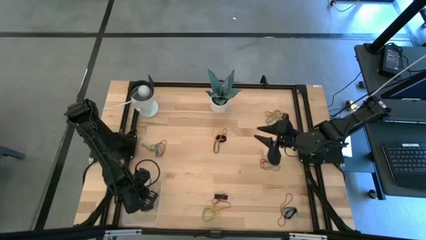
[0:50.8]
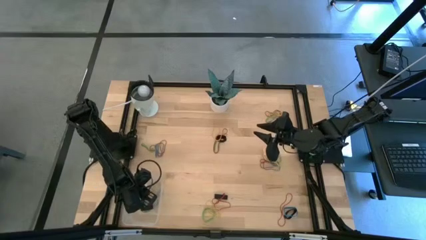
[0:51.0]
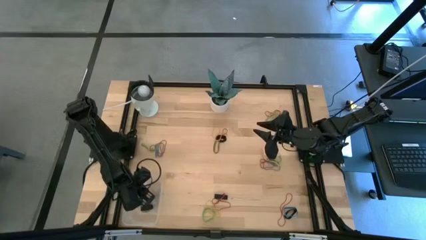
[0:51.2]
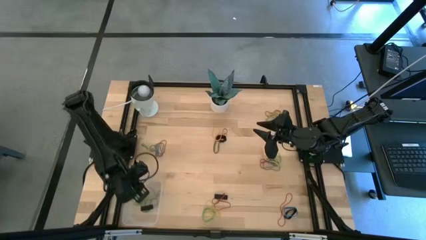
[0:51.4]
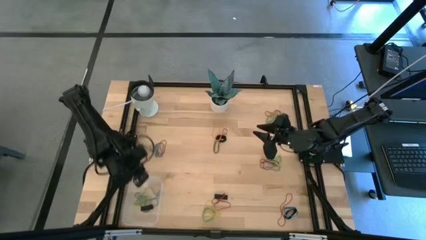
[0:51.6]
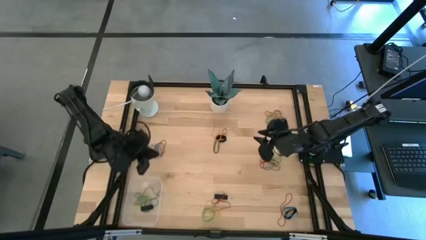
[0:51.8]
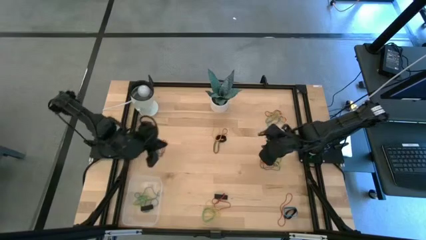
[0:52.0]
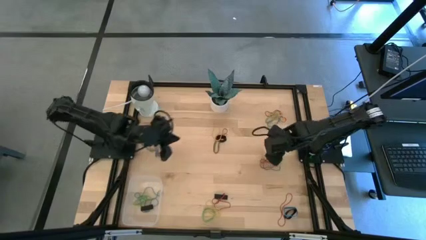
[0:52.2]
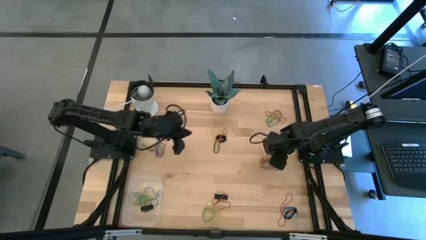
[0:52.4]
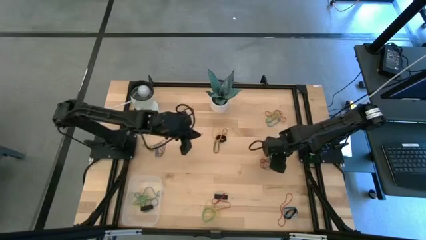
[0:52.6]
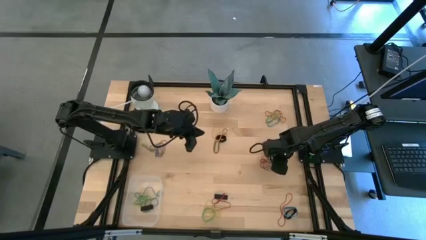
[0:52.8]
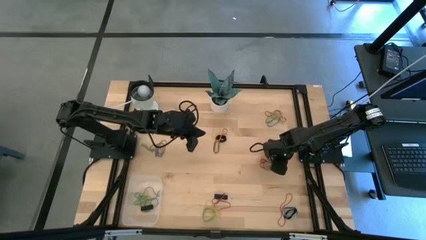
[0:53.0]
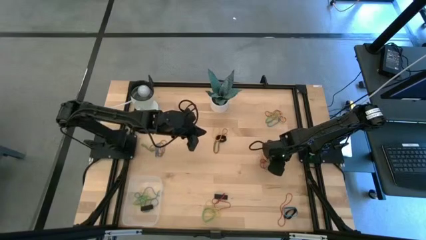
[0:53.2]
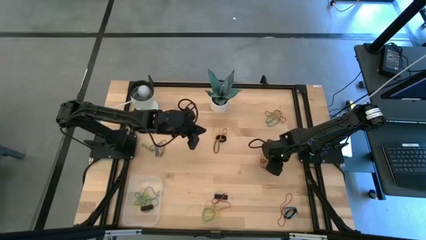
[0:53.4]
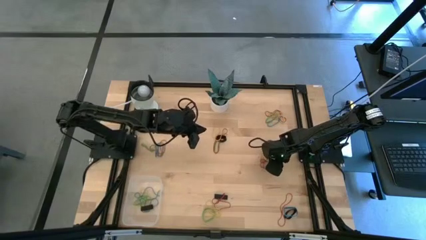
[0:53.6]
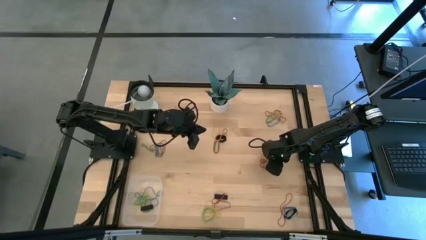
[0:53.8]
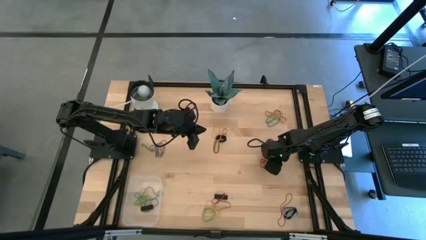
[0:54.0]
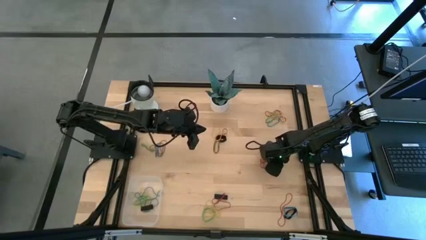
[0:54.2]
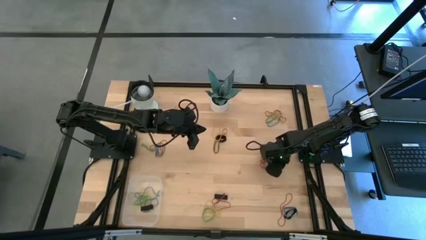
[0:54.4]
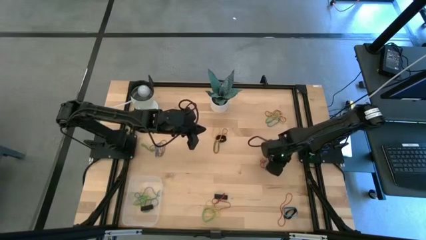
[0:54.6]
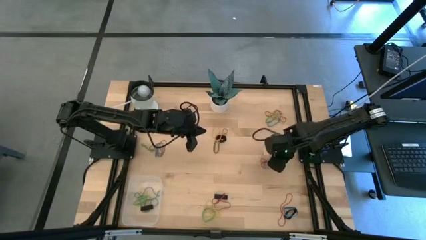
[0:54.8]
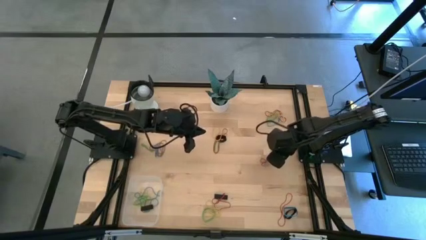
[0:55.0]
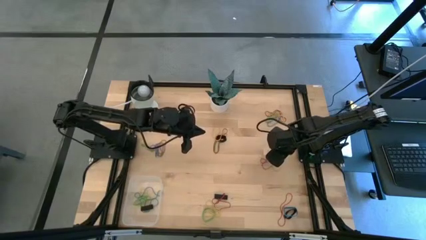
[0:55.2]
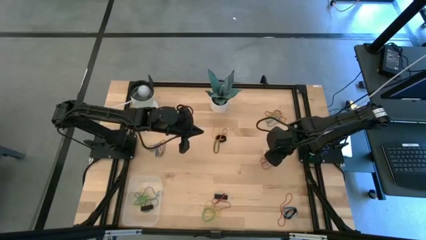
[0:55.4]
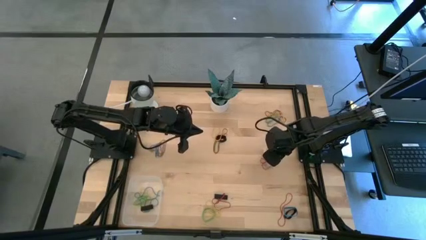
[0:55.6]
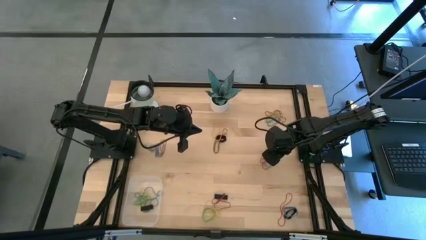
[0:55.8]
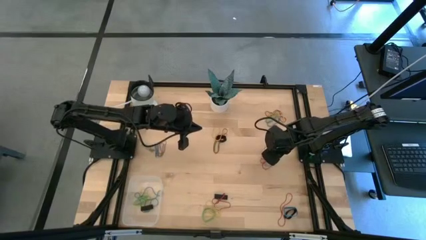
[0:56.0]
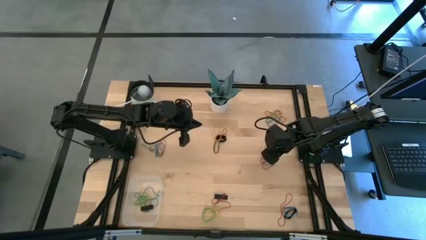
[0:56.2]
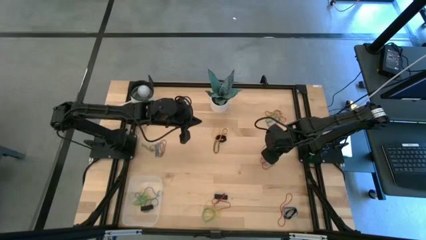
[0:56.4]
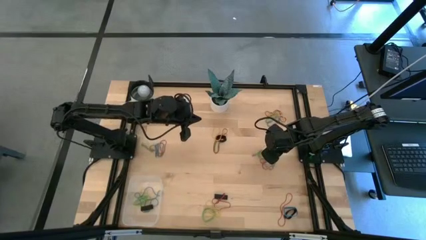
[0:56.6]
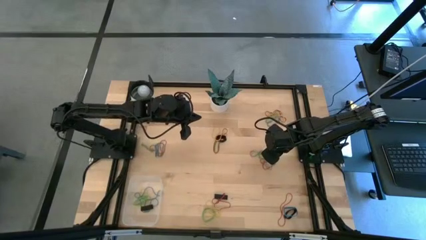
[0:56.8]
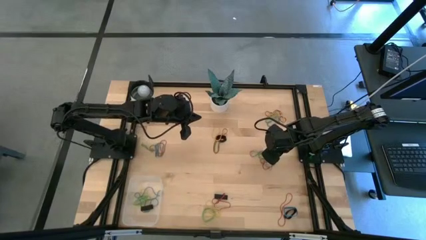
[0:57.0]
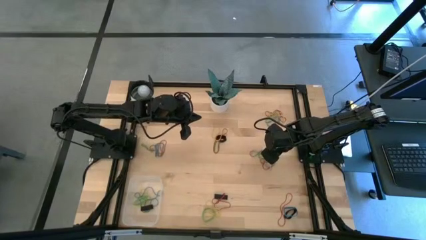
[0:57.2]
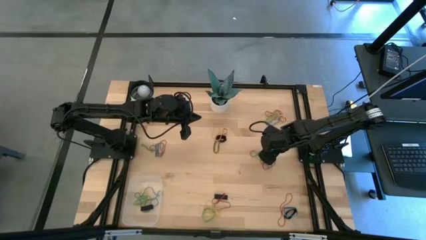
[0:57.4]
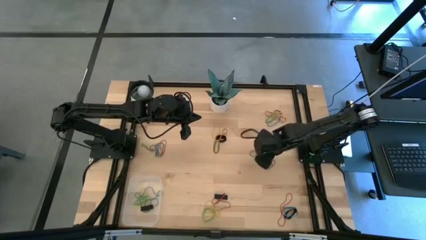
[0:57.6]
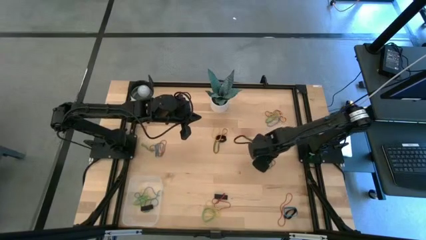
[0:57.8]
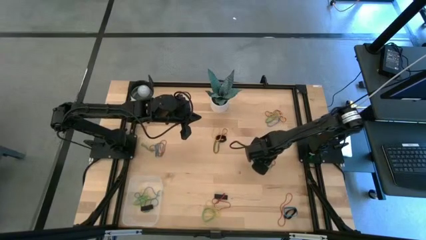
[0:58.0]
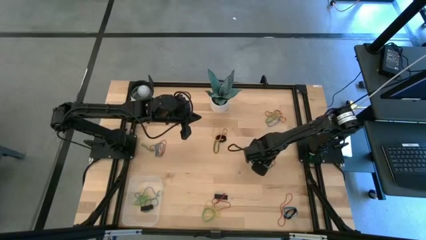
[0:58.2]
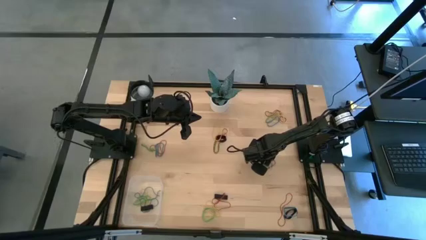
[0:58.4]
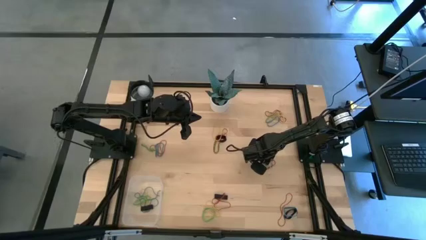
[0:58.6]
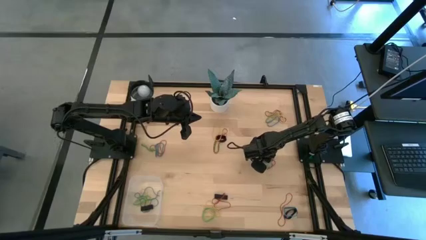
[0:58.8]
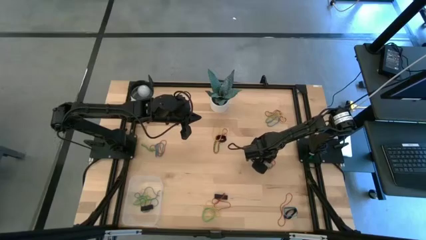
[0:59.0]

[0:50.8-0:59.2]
Task: Pick and place rubber bands into bin
Put the yellow rubber band into the transparent bin

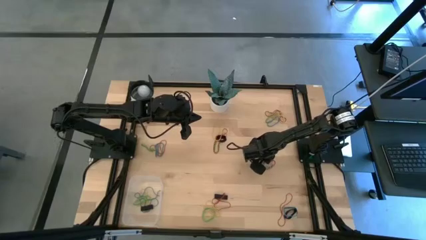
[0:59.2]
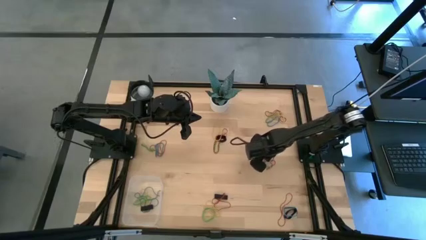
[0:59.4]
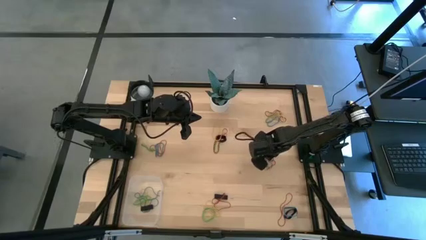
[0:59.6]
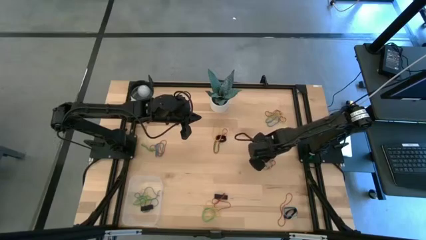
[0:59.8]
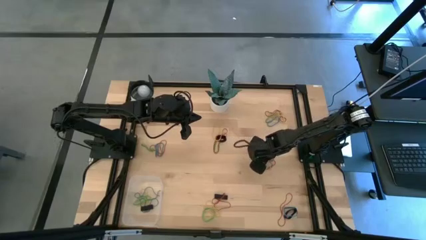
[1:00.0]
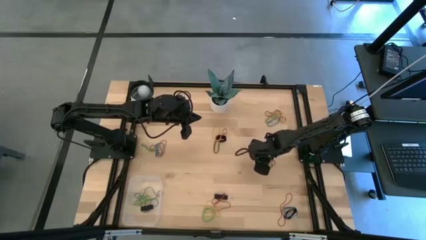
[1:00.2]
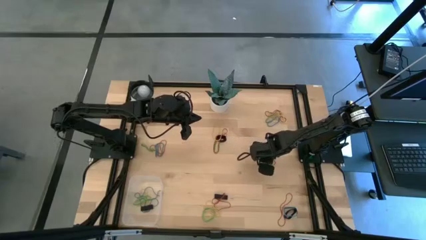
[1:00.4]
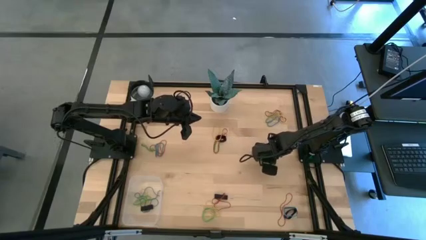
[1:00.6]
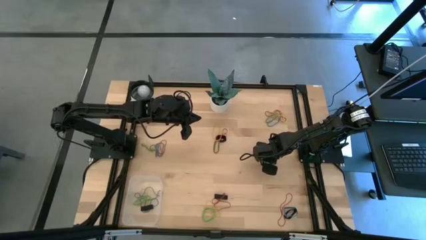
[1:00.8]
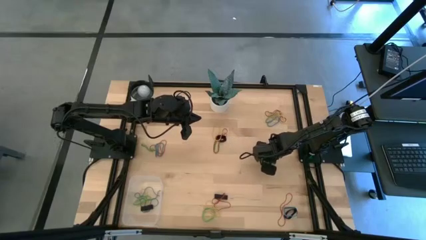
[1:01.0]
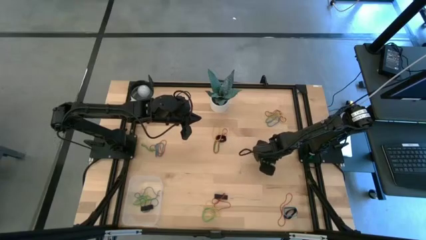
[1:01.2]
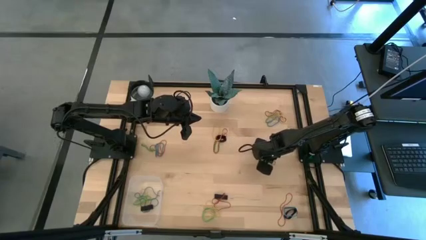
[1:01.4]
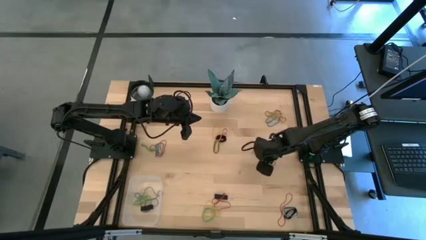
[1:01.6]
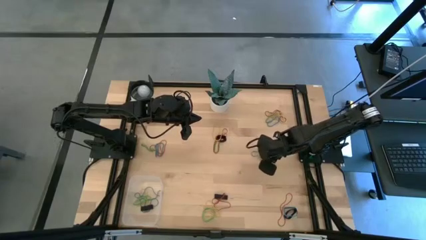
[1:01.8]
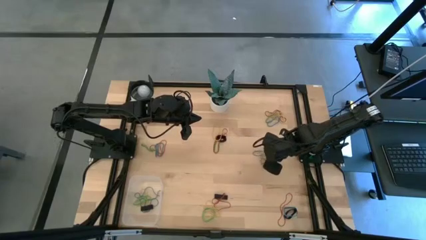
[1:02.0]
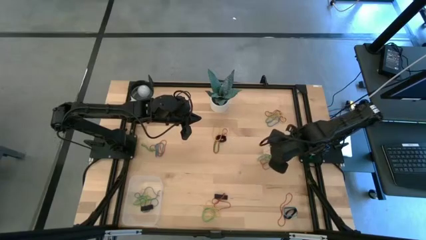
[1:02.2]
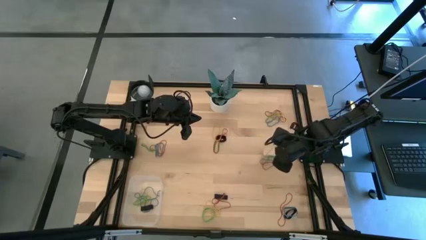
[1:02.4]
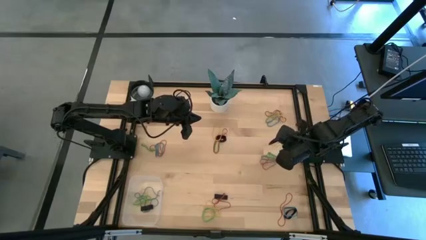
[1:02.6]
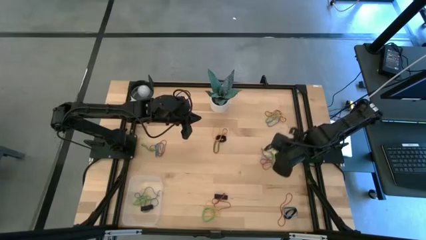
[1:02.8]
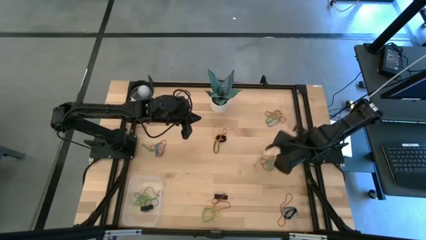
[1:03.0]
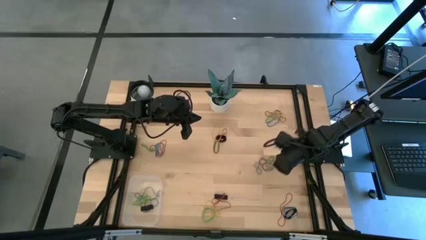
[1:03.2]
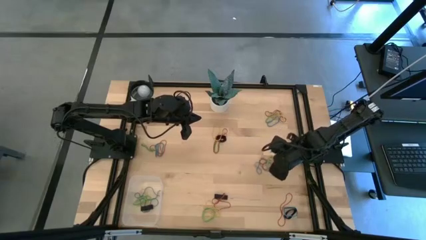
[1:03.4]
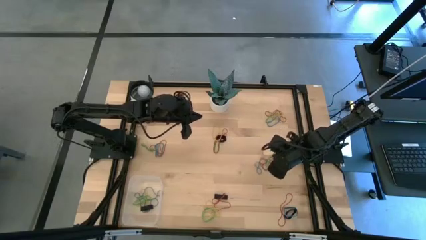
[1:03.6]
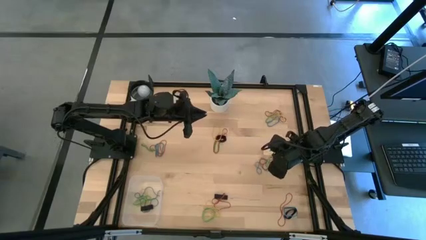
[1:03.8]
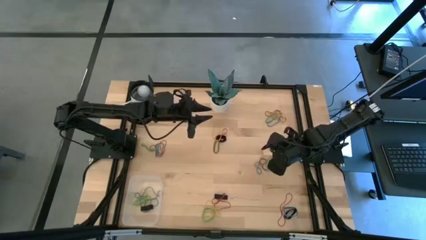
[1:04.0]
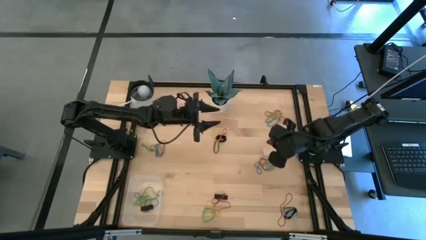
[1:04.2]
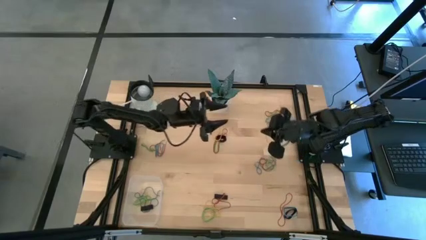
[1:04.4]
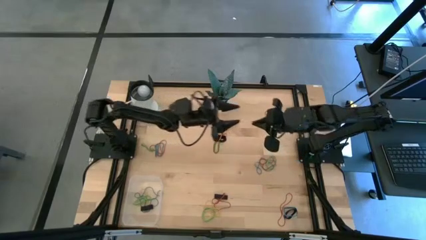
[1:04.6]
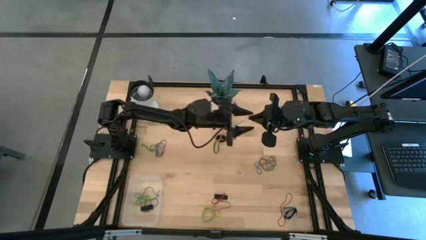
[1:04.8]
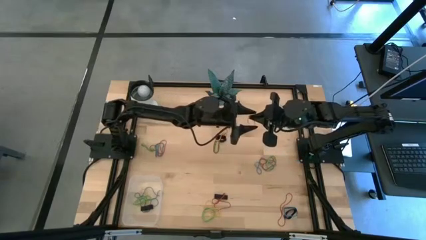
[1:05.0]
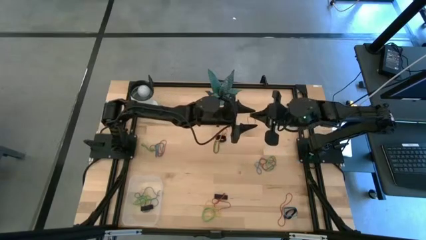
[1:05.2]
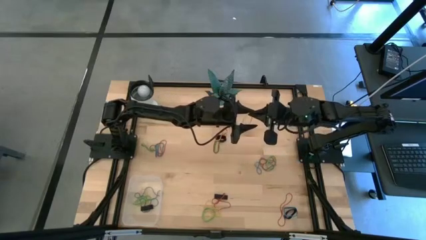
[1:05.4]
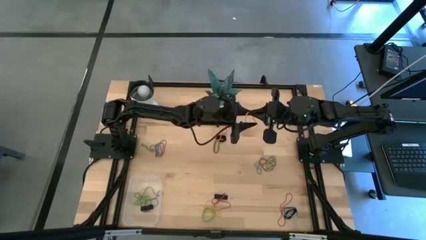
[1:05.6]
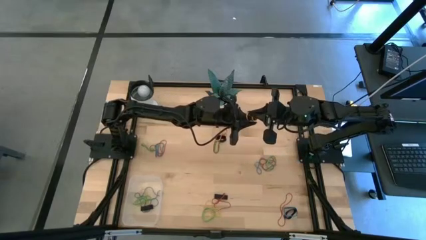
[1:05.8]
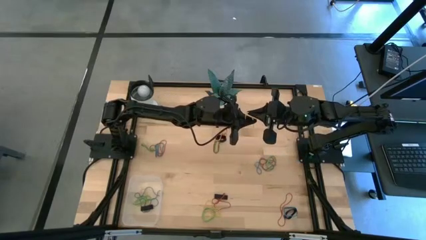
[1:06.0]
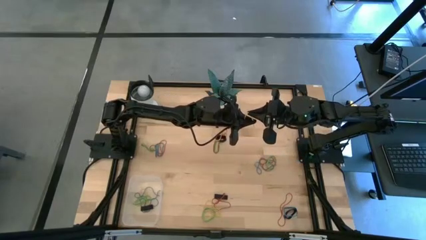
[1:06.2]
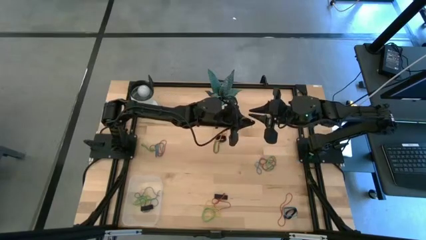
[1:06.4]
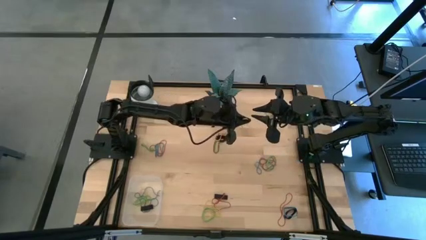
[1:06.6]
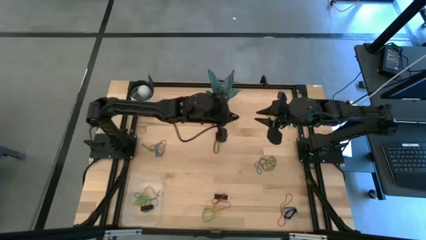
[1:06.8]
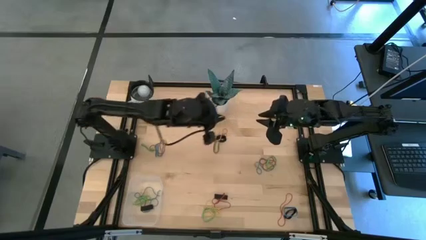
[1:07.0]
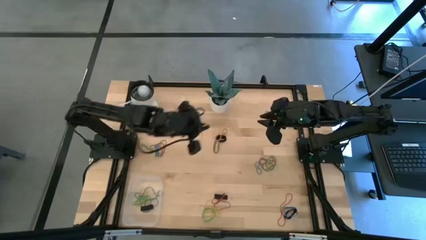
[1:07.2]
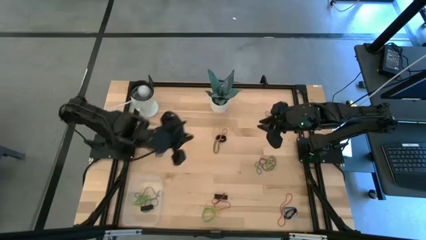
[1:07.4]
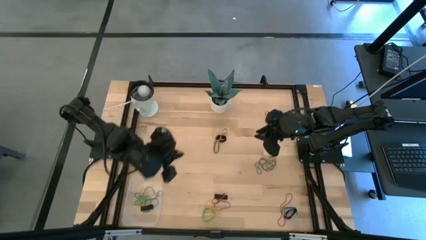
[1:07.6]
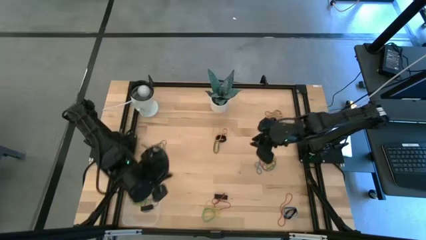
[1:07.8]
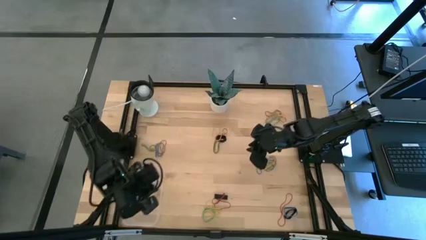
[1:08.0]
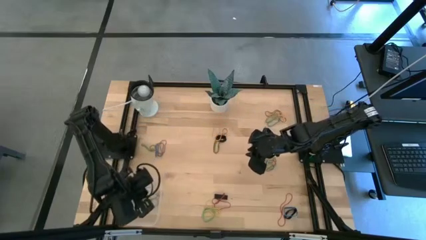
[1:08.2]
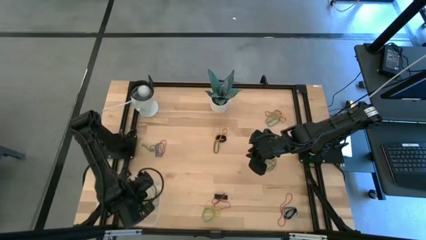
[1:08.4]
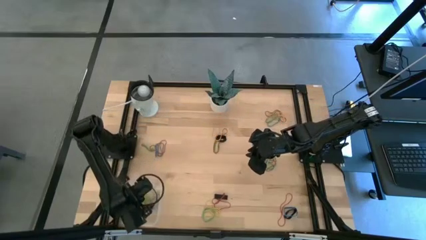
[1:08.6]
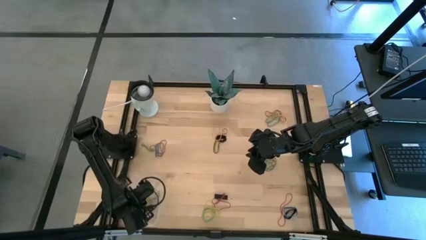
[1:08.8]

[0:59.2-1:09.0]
Put the yellow rubber band into the transparent bin
